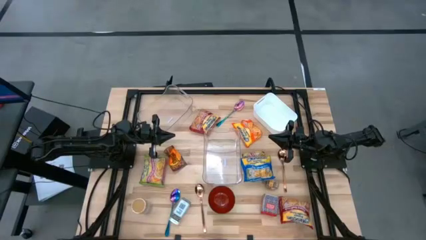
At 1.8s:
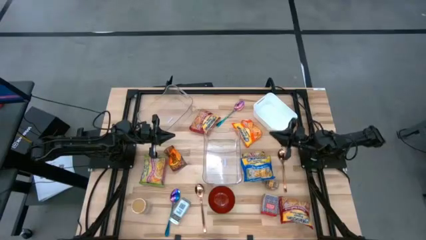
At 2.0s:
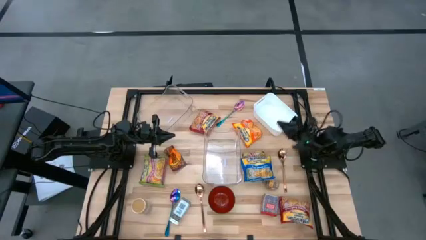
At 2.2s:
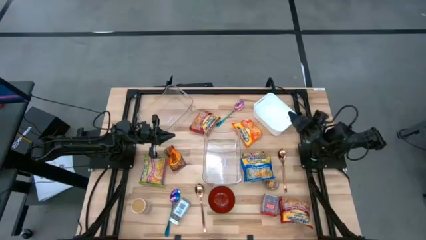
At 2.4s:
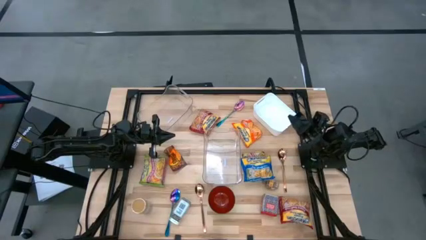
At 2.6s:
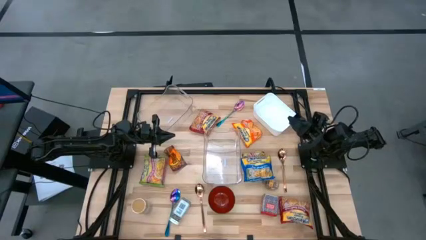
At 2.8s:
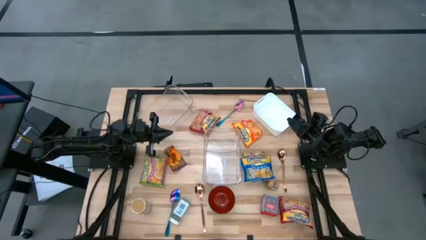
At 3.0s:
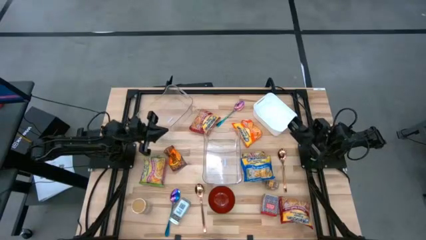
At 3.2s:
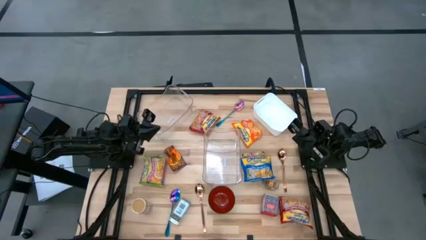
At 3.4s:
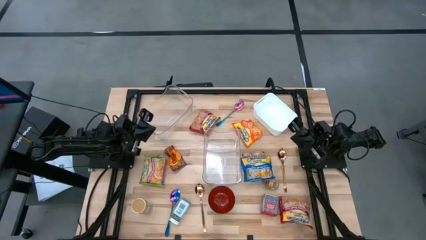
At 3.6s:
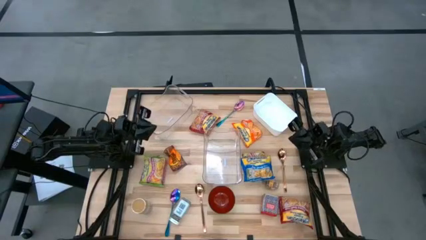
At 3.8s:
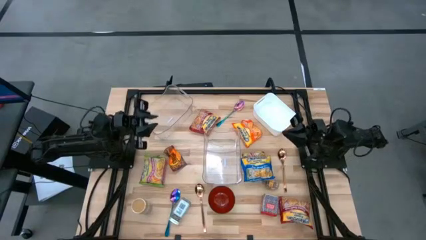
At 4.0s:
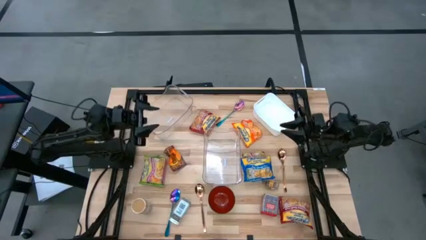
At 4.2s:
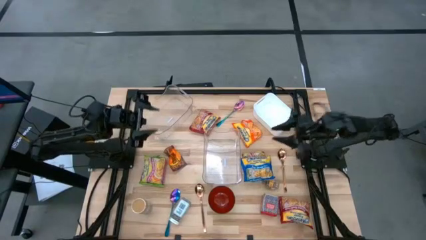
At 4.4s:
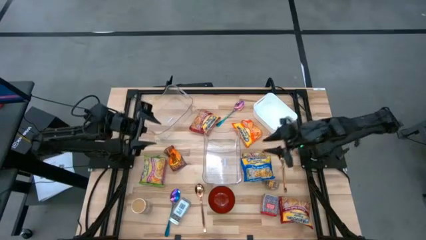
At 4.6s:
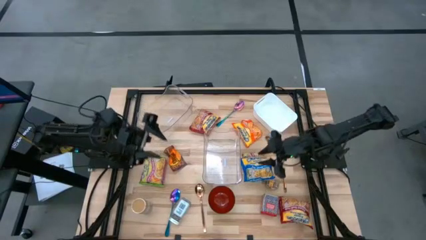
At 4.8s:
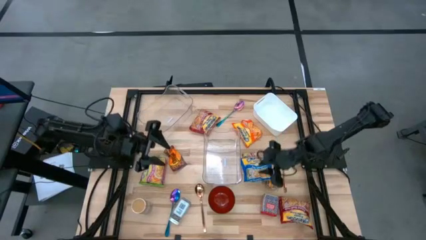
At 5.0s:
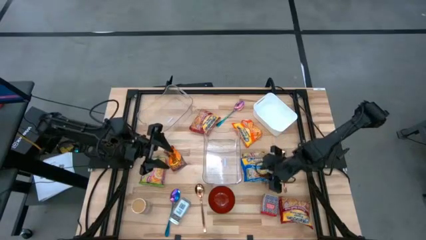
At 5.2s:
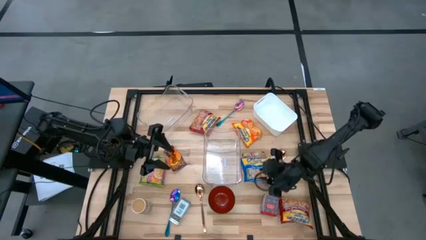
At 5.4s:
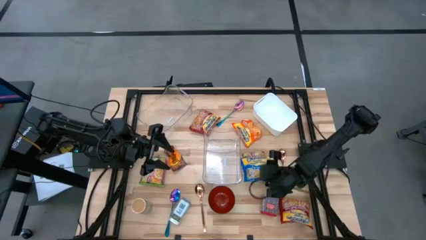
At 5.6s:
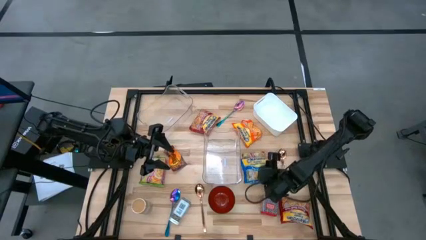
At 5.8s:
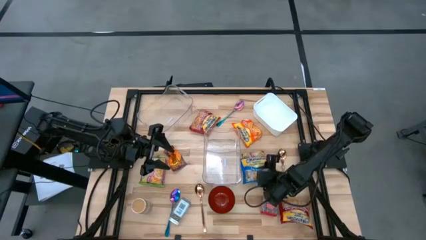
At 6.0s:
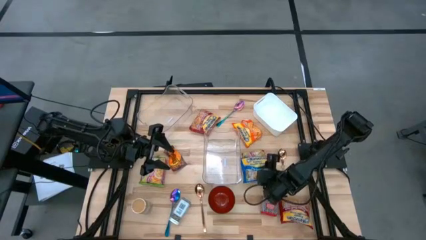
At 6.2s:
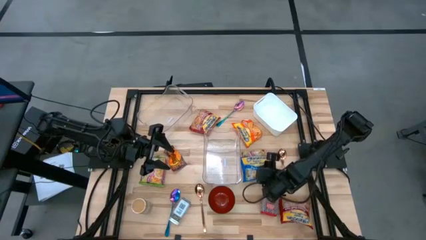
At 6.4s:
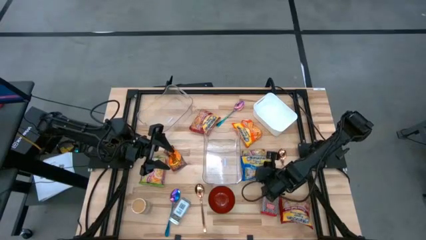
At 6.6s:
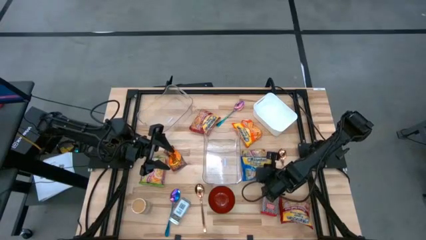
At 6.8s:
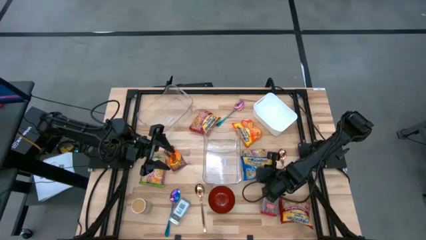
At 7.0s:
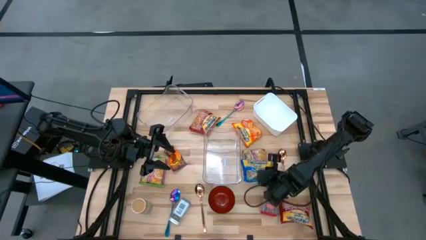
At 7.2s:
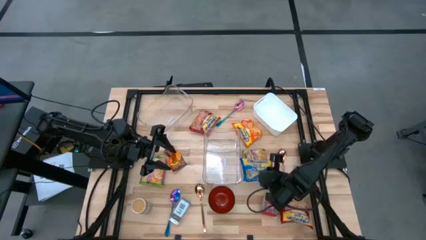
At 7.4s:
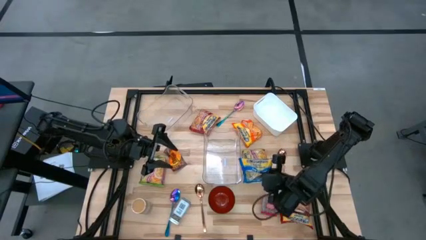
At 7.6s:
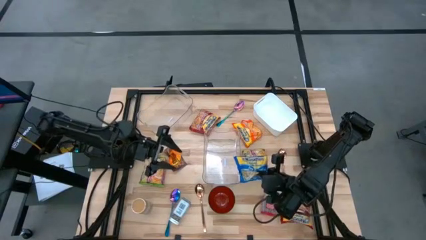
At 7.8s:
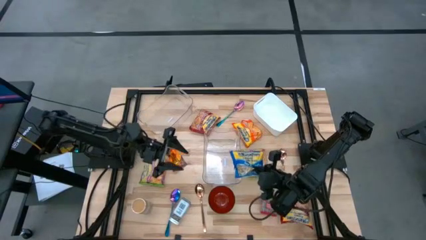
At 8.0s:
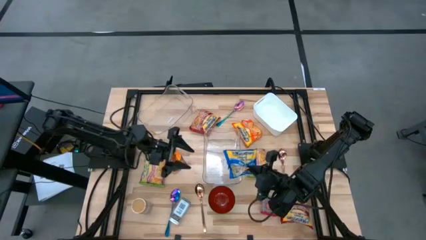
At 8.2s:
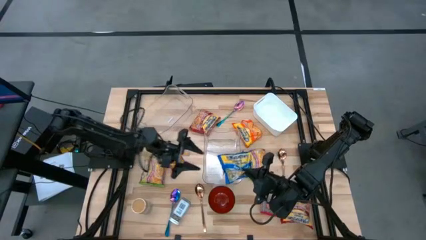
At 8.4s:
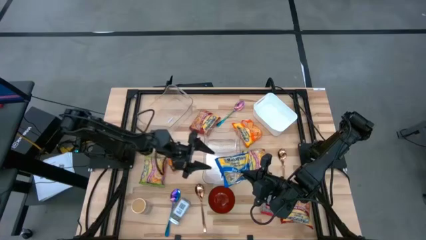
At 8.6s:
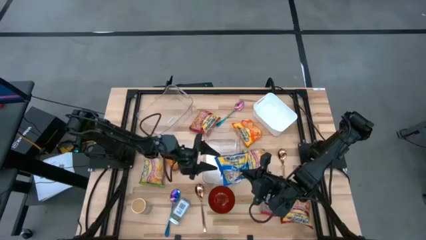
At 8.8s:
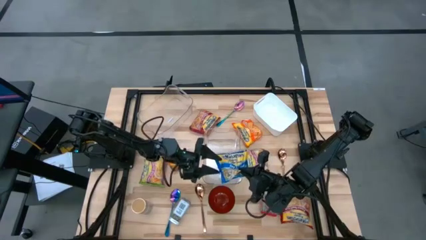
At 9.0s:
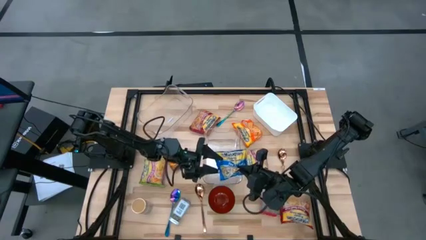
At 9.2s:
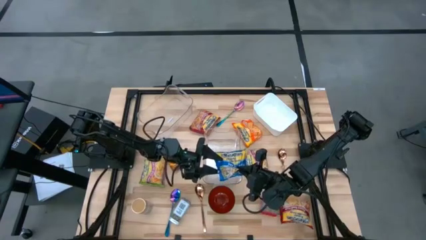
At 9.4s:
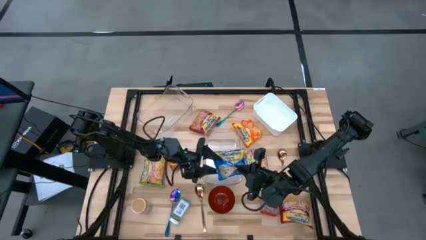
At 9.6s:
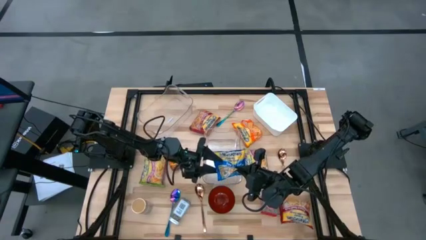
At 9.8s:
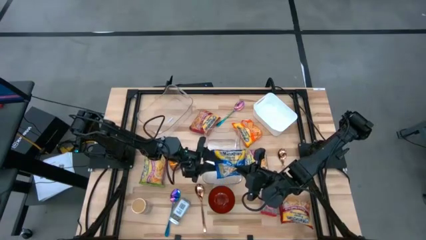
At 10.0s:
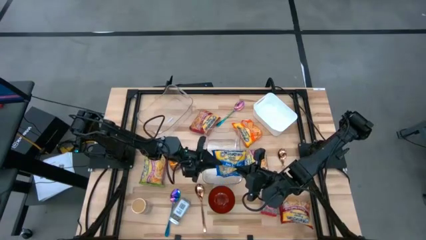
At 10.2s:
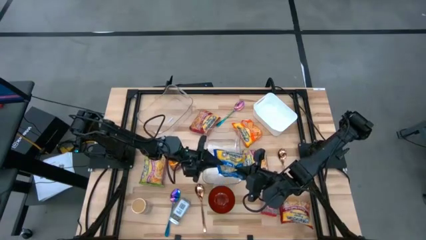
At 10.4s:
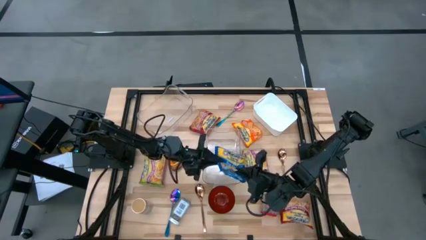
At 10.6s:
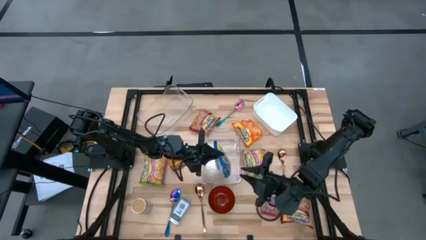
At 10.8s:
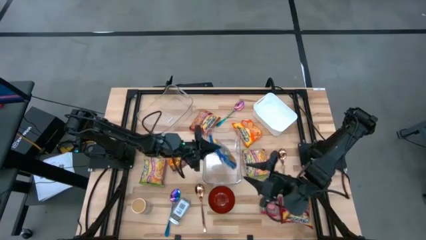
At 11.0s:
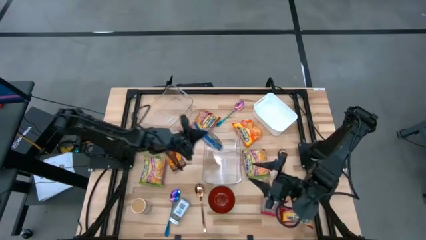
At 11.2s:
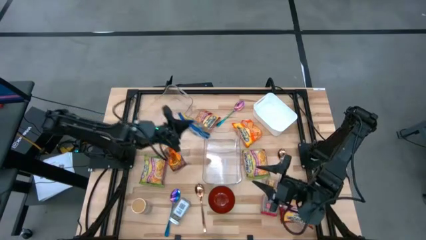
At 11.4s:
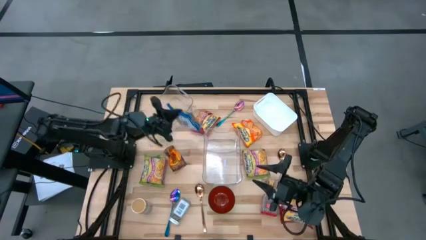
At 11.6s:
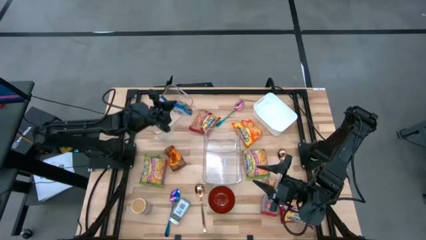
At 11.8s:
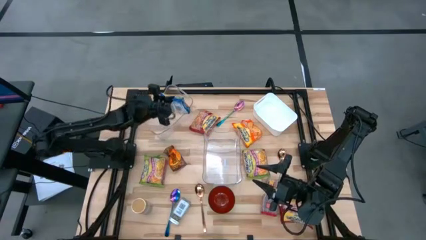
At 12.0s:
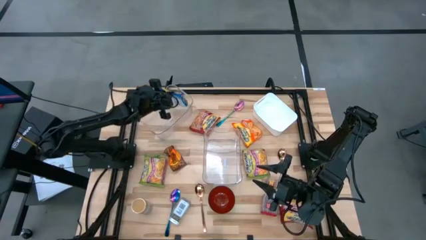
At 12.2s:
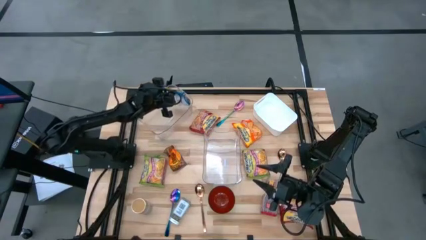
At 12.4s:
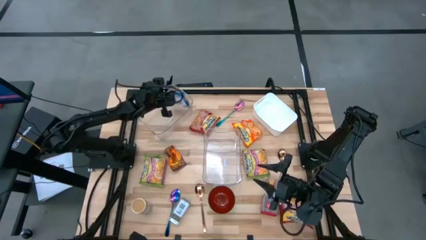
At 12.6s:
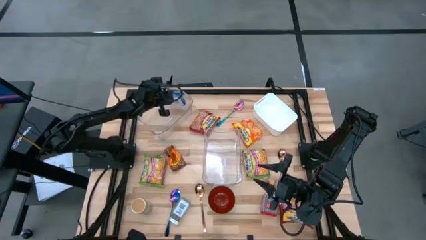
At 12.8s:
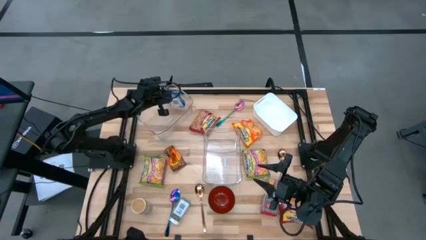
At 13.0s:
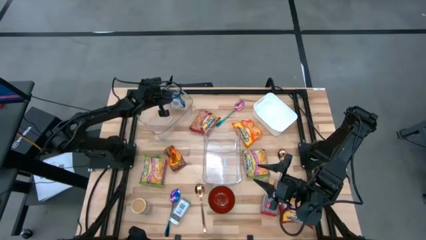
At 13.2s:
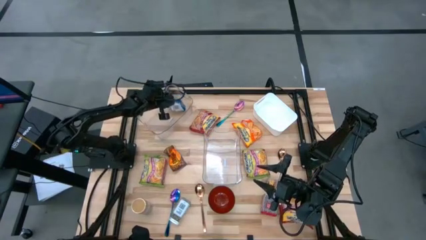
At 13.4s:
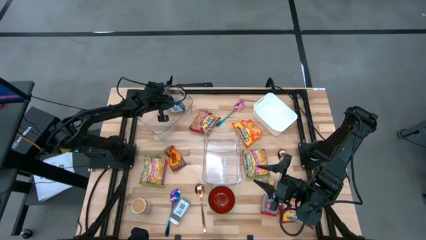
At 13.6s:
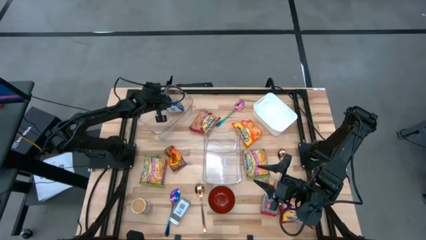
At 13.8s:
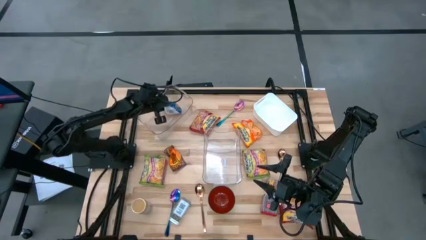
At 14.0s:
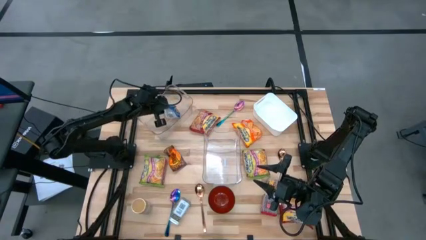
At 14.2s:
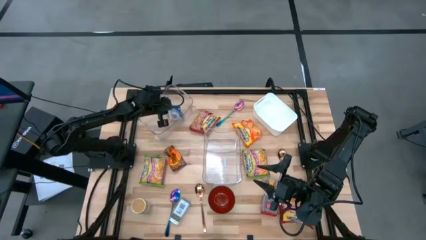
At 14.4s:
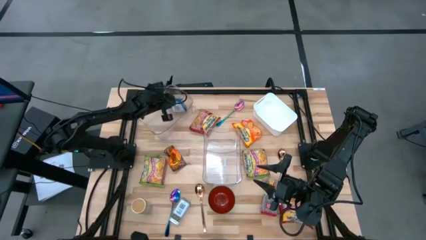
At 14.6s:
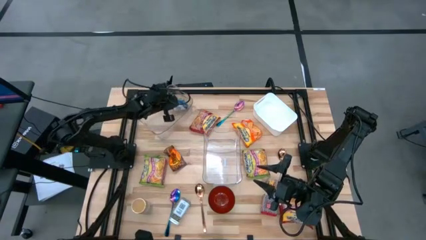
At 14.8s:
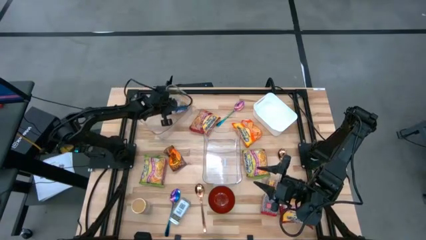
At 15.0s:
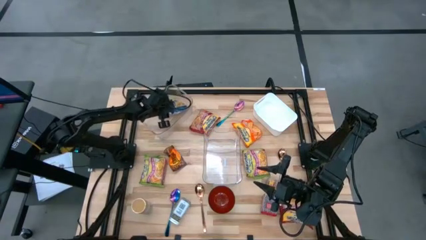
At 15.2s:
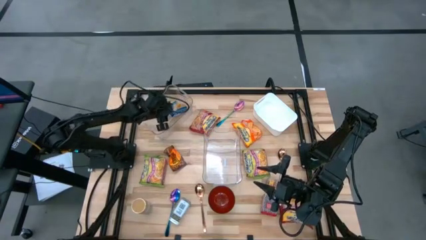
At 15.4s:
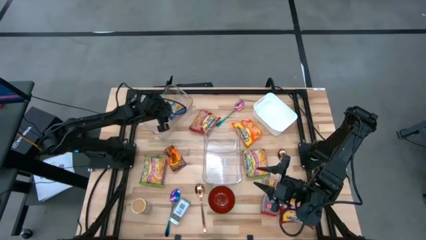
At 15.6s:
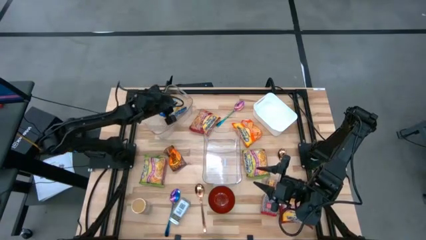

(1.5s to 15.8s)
Task: Pick & Place Food Item
Put the blue noodle pack into the top transparent bin

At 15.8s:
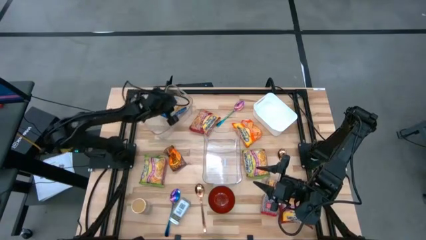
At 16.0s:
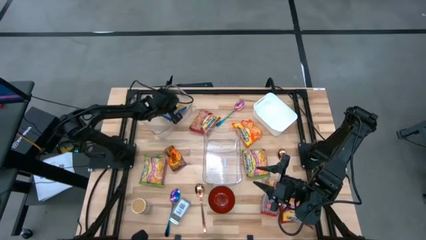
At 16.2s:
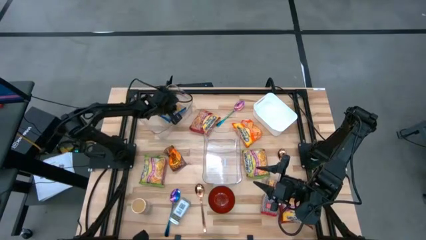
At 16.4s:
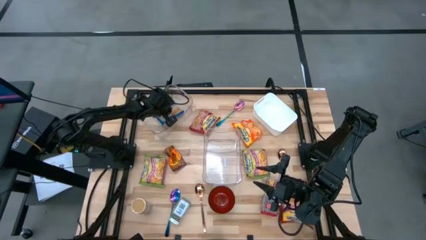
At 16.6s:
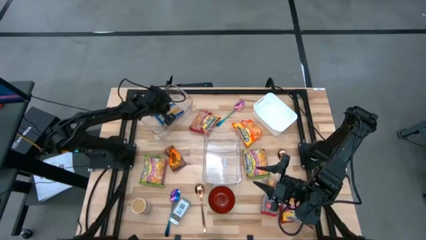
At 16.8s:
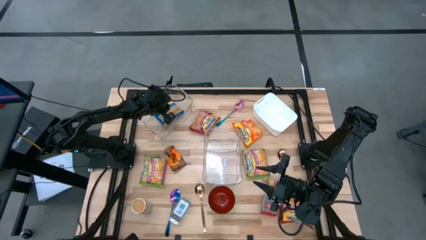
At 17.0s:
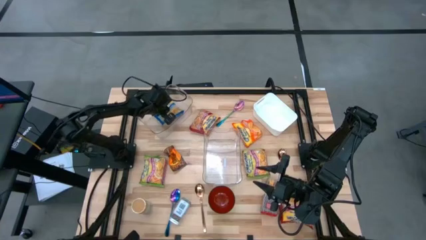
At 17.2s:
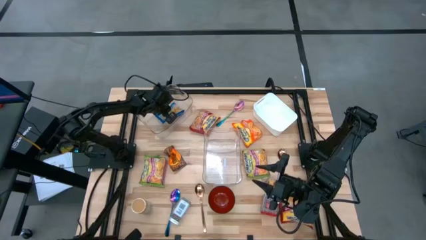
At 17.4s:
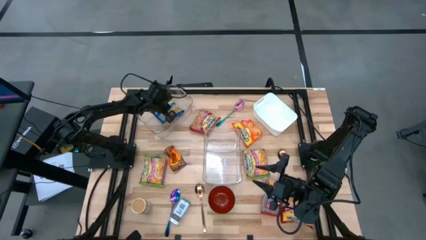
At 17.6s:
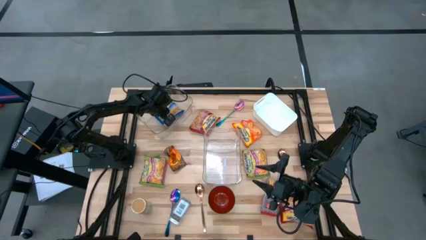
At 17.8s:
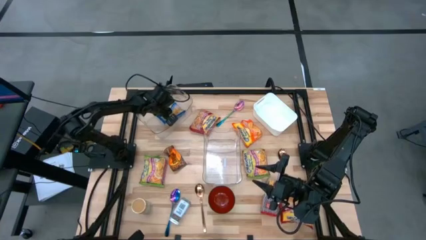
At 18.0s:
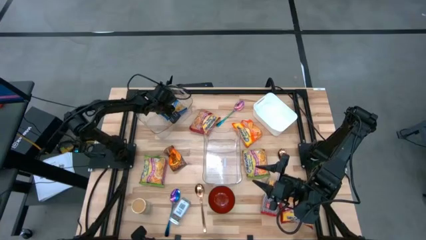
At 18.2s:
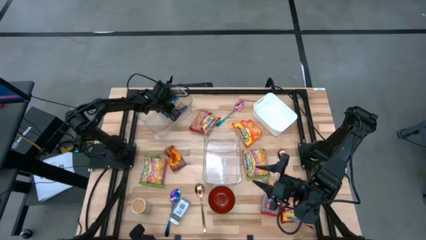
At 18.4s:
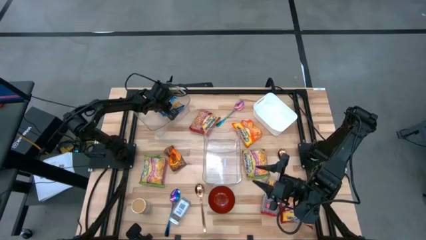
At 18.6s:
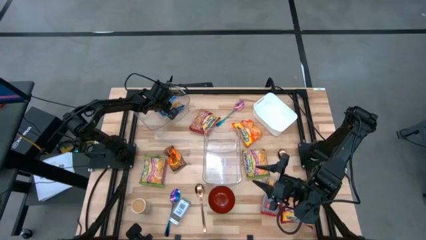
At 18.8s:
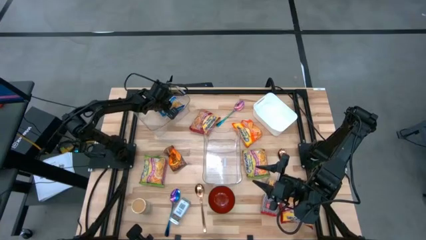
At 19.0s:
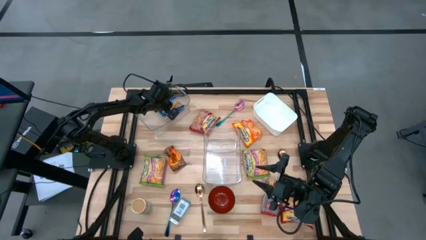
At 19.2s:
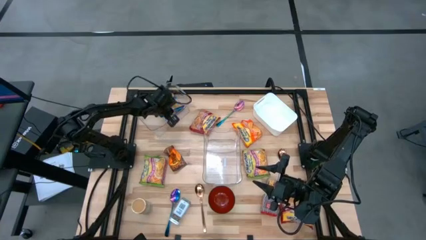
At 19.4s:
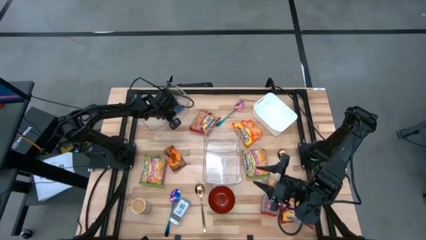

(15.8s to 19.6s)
Adjust the blue noodle pack in the top transparent bin
